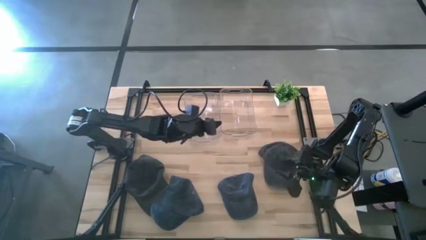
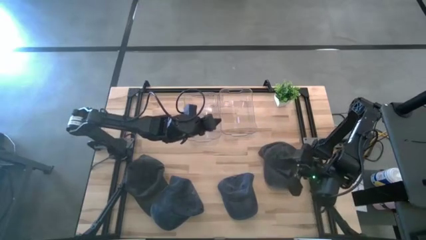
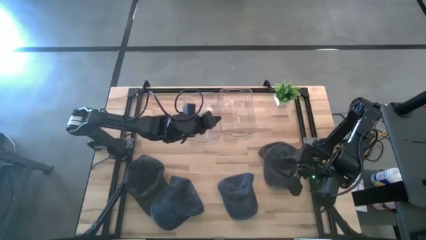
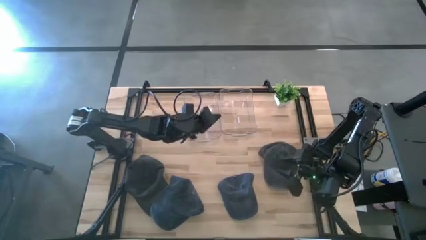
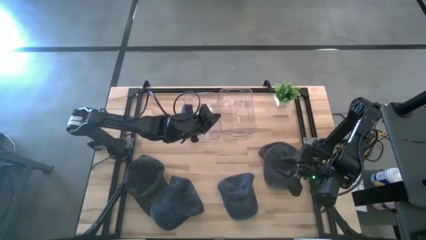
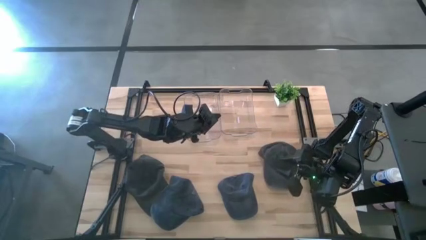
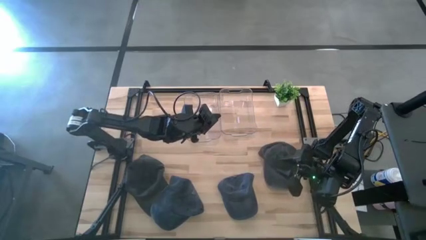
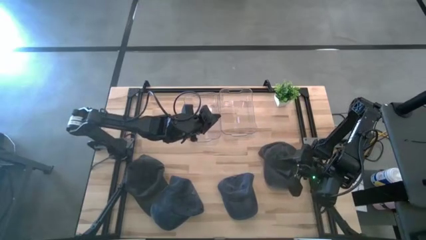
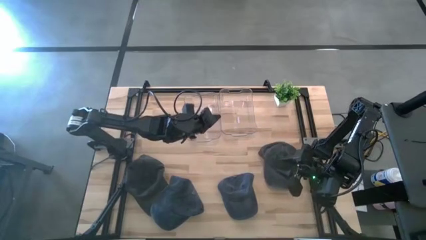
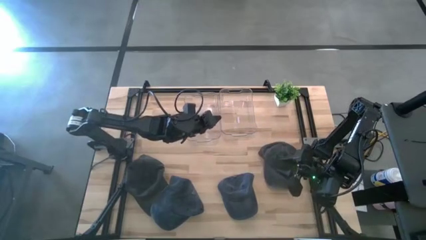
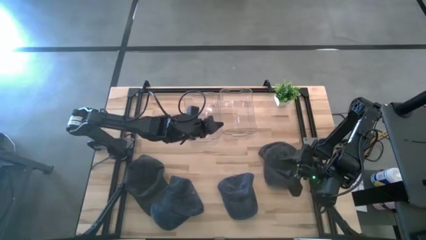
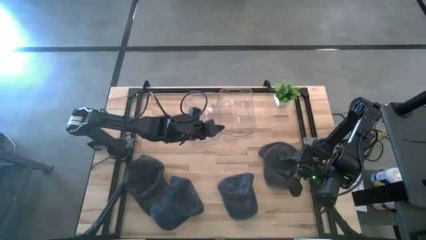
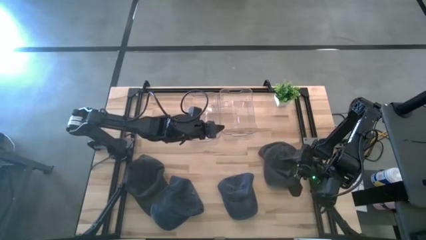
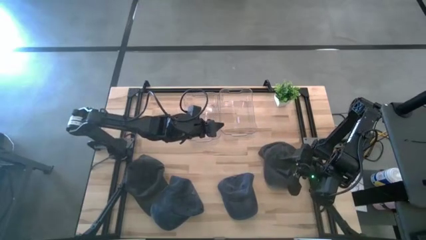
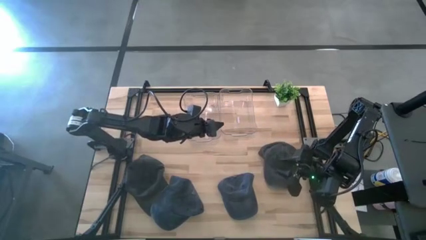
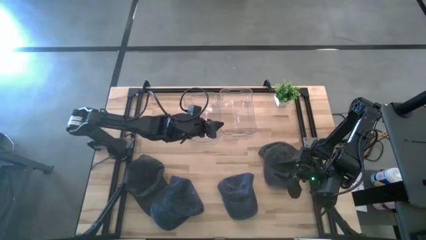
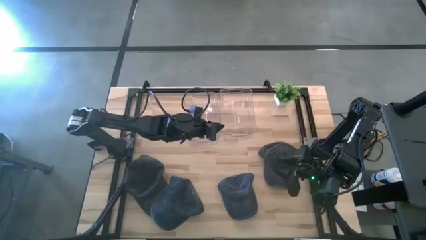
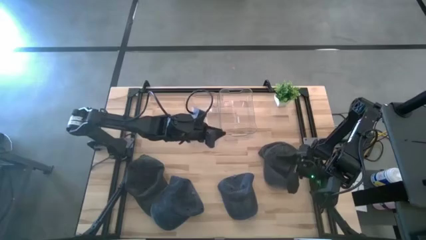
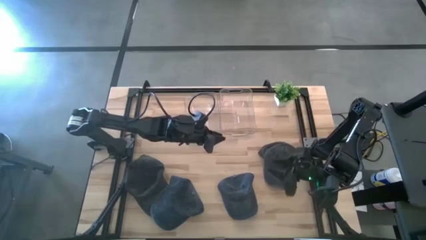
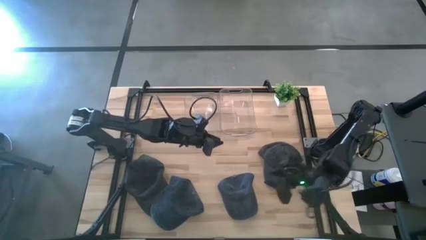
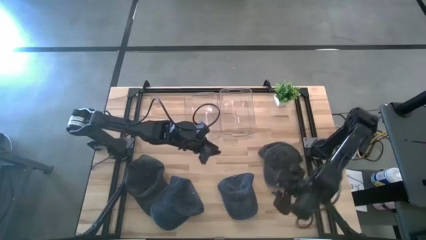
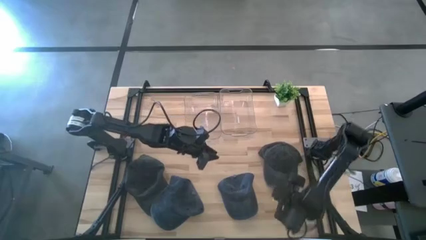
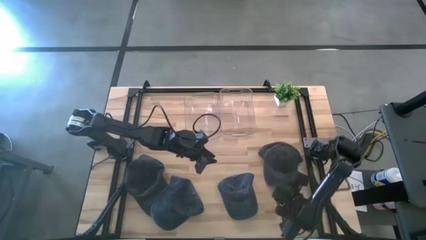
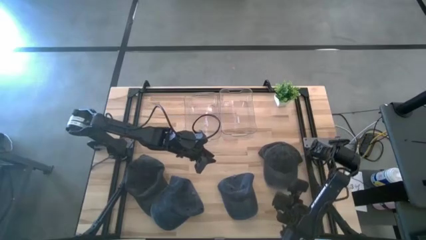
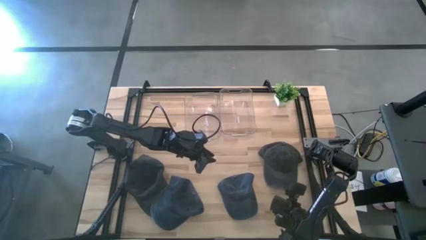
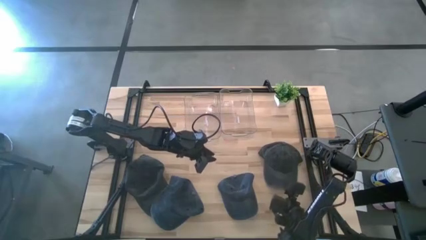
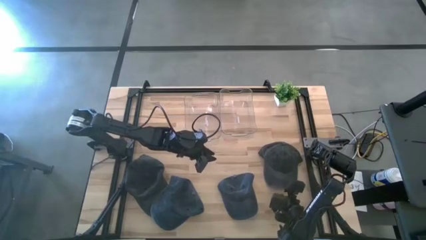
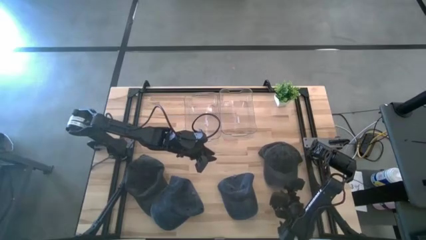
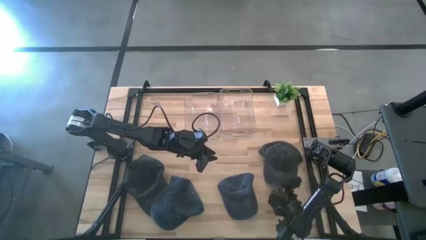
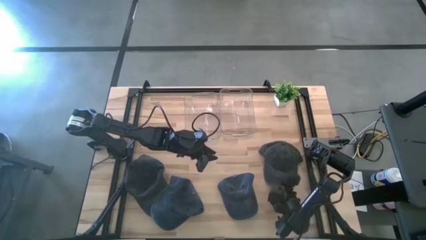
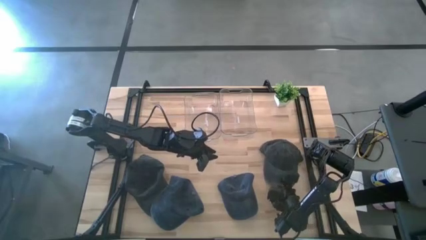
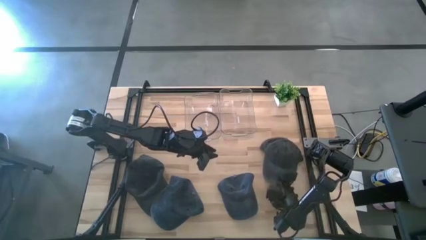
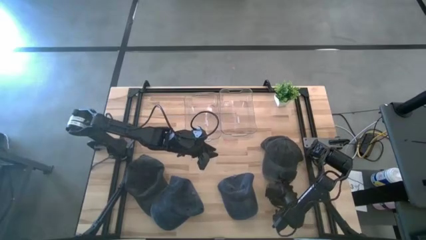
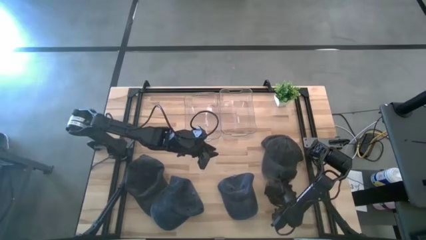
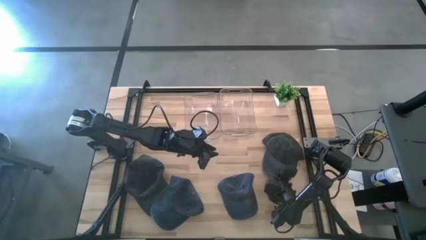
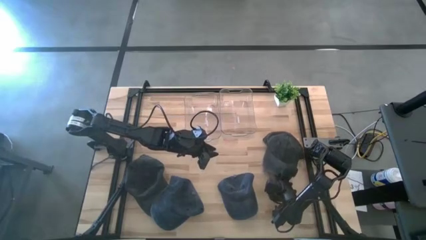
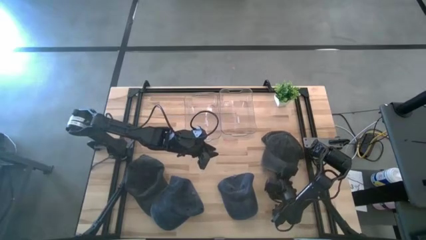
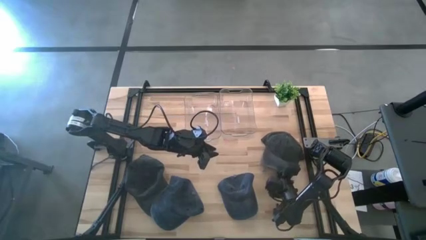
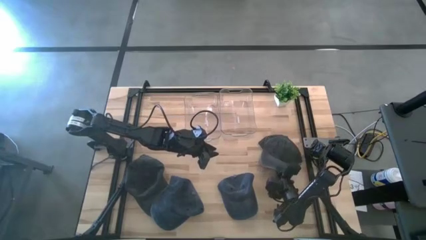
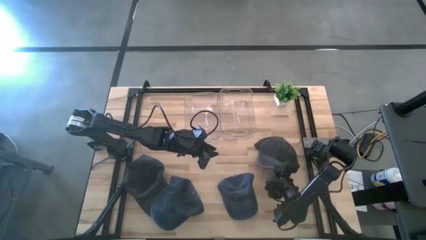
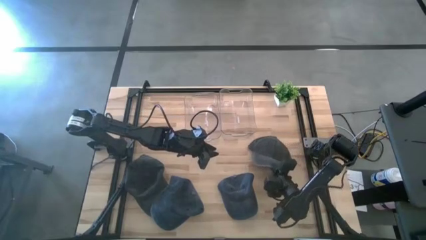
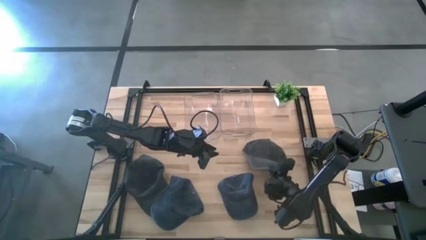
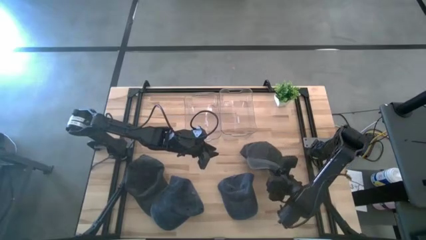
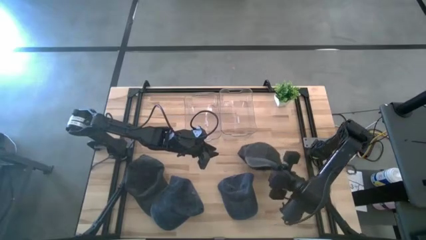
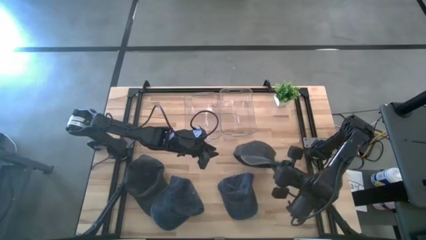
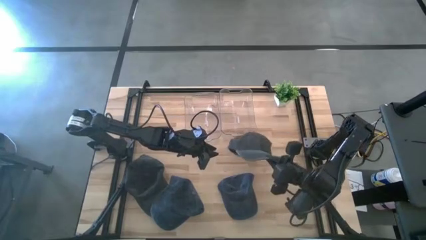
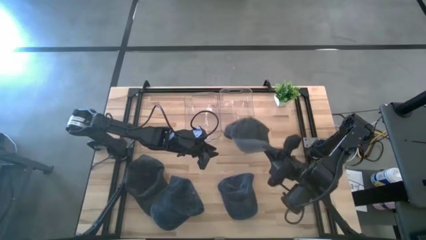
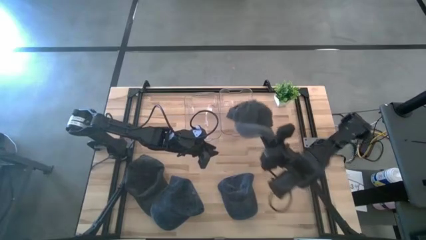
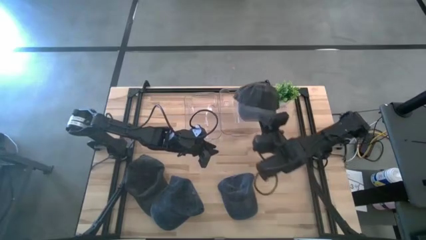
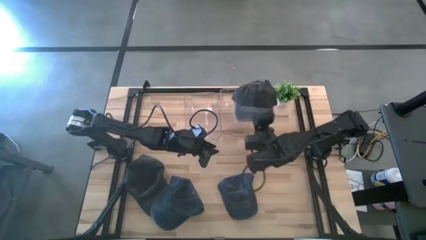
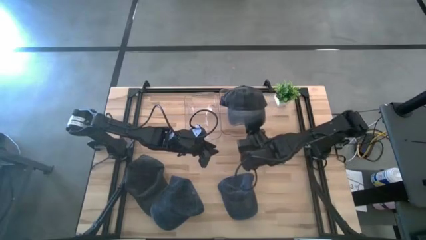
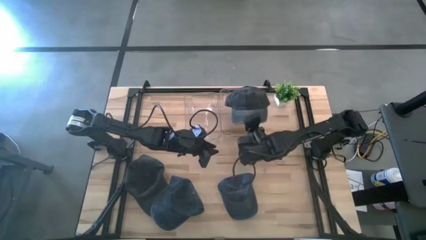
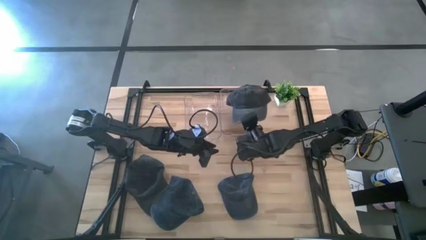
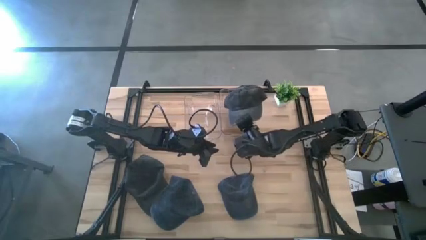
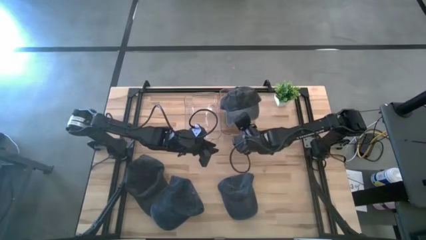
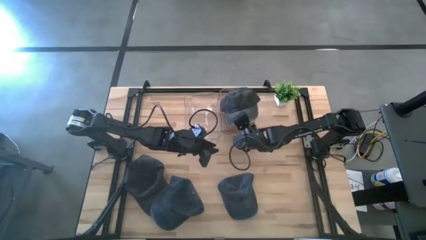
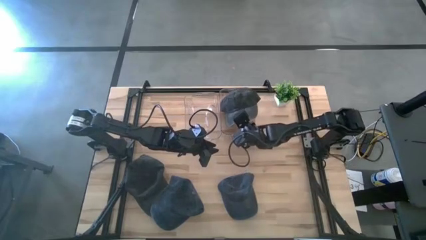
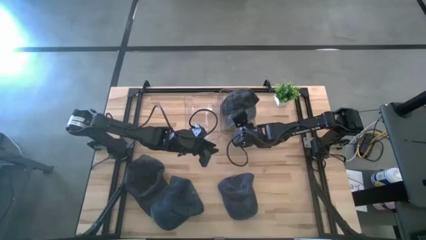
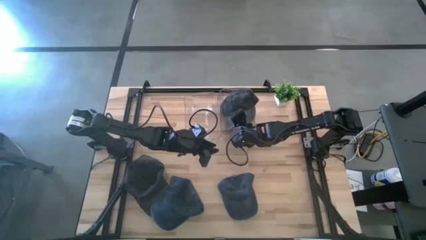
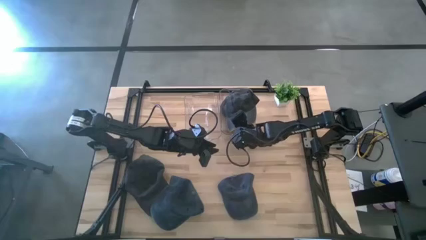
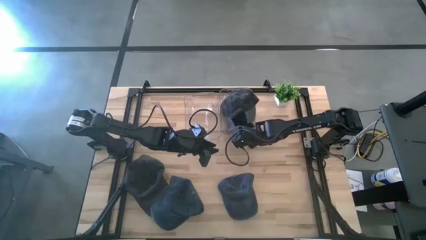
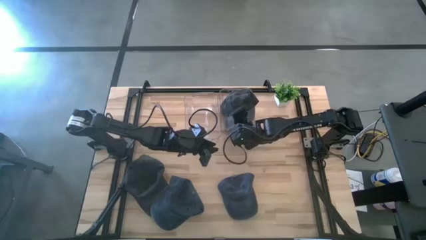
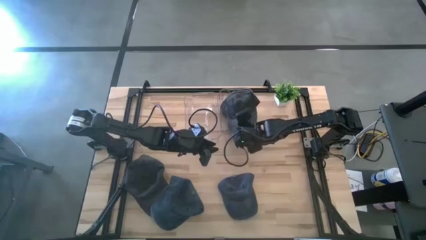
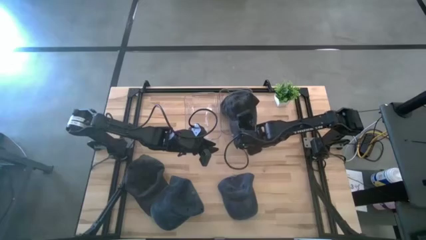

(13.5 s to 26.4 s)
Task: Pick & Place hat
Put the right black cap into the right transparent bin
